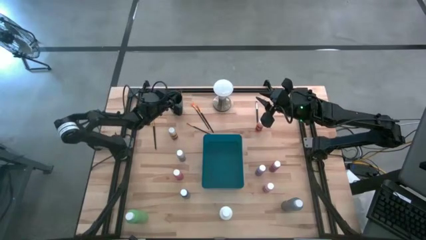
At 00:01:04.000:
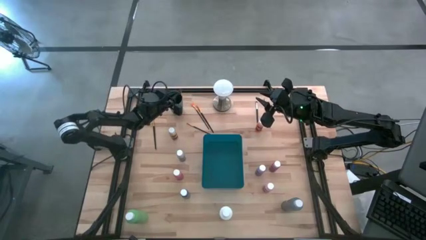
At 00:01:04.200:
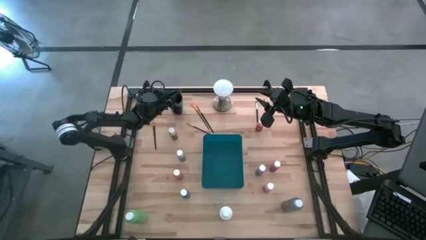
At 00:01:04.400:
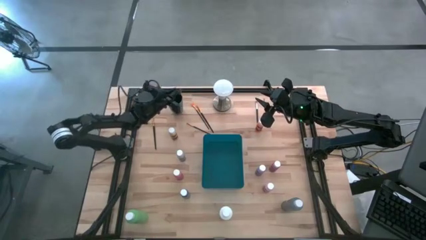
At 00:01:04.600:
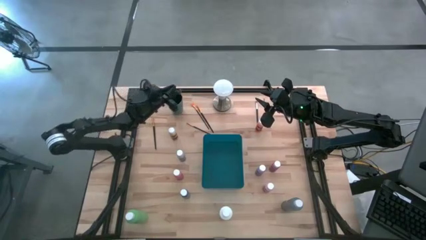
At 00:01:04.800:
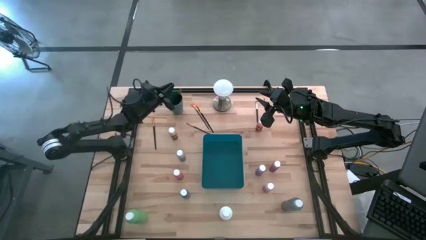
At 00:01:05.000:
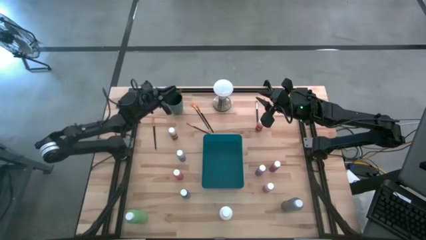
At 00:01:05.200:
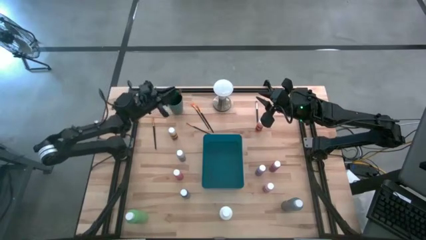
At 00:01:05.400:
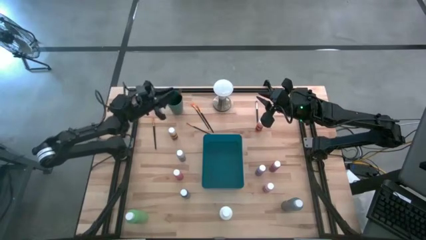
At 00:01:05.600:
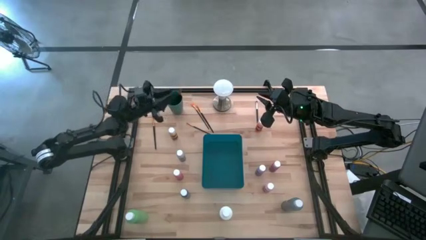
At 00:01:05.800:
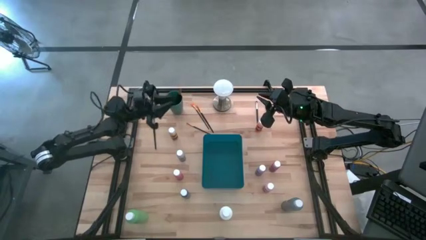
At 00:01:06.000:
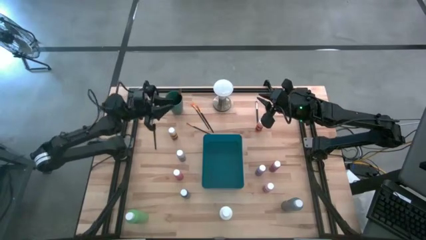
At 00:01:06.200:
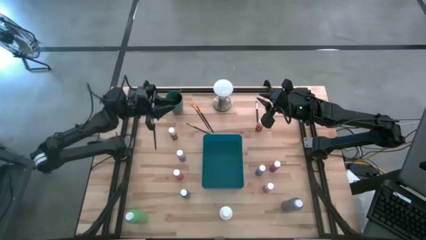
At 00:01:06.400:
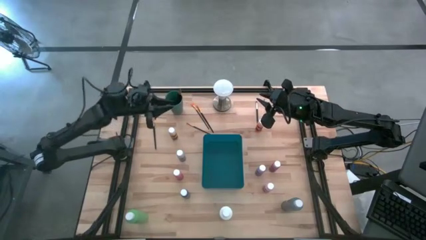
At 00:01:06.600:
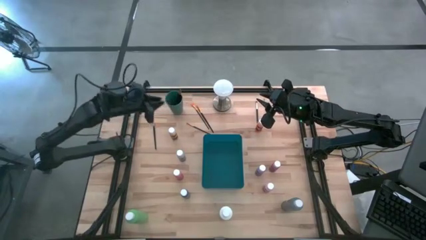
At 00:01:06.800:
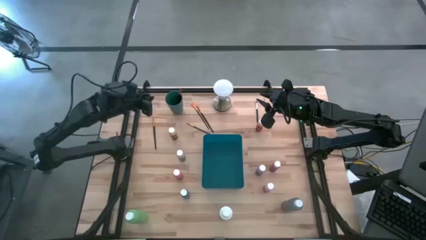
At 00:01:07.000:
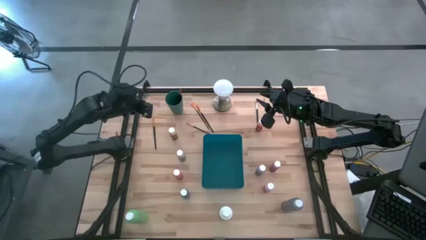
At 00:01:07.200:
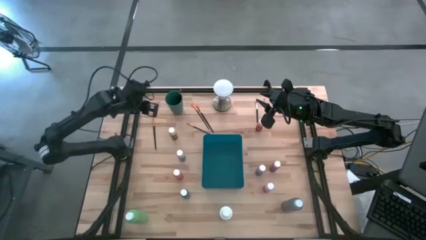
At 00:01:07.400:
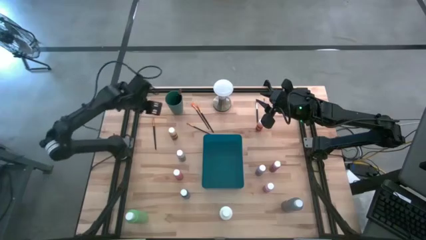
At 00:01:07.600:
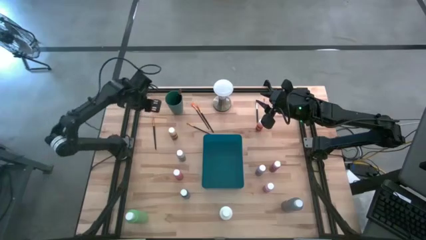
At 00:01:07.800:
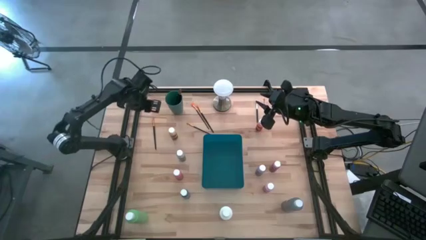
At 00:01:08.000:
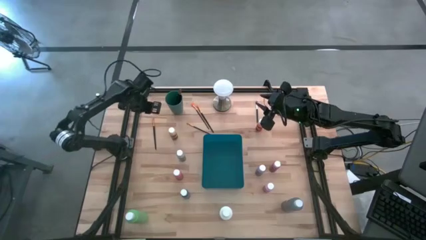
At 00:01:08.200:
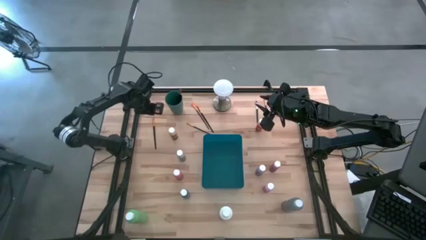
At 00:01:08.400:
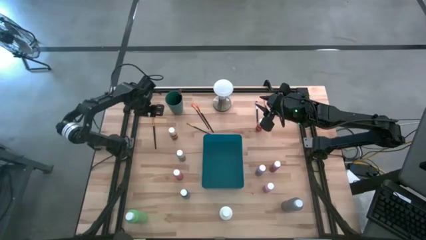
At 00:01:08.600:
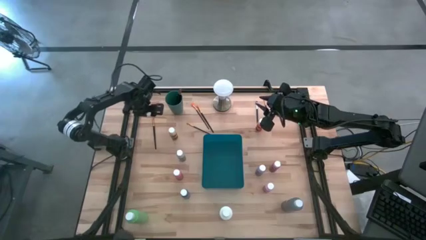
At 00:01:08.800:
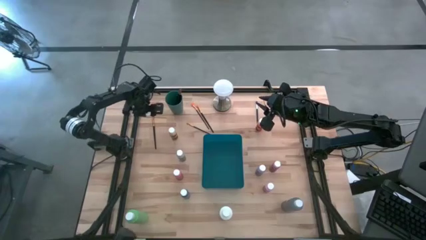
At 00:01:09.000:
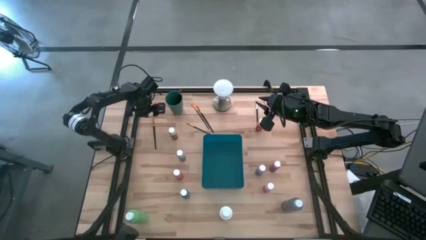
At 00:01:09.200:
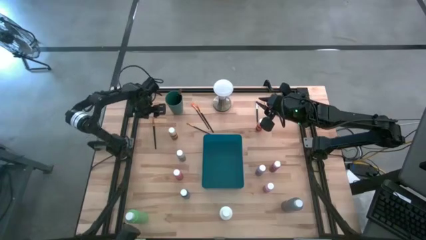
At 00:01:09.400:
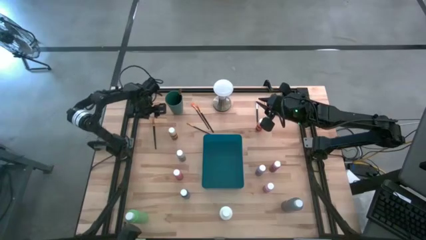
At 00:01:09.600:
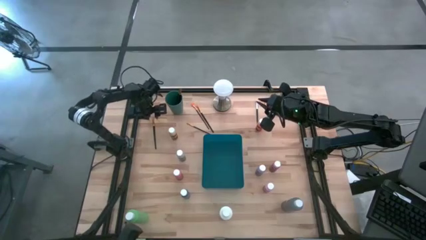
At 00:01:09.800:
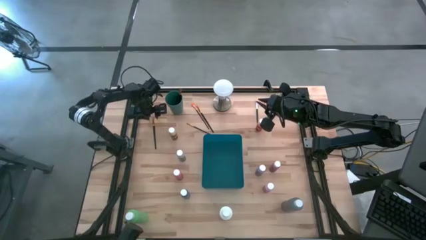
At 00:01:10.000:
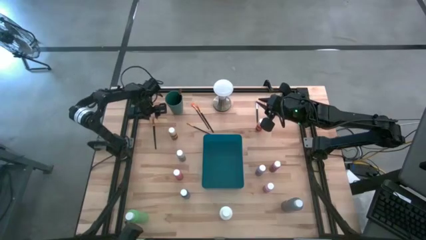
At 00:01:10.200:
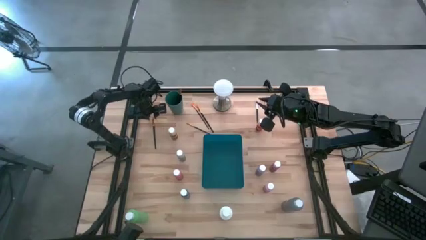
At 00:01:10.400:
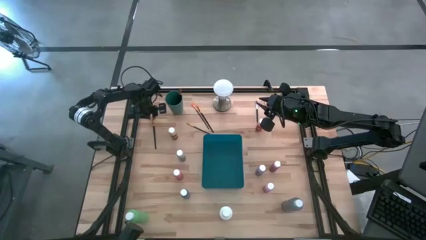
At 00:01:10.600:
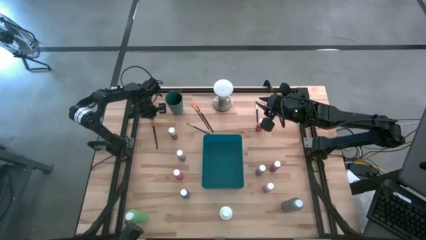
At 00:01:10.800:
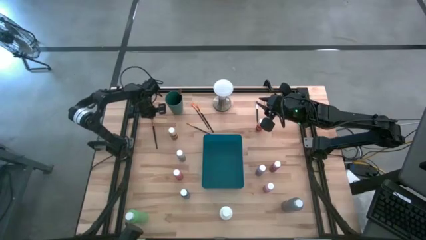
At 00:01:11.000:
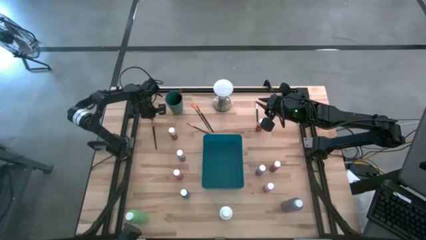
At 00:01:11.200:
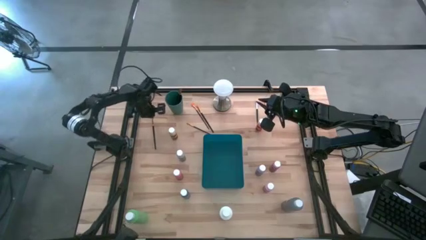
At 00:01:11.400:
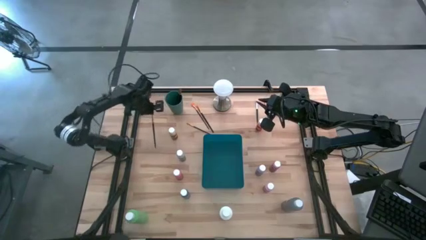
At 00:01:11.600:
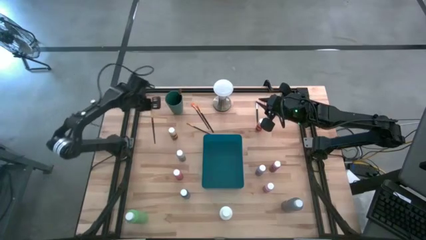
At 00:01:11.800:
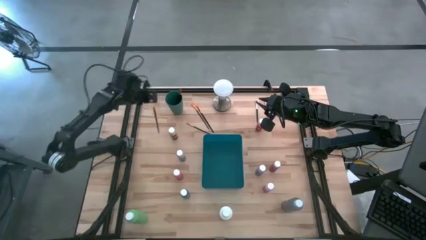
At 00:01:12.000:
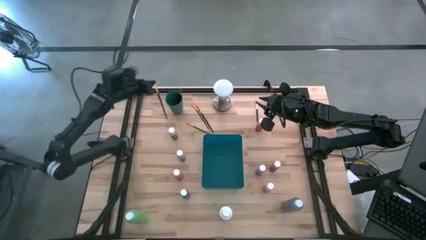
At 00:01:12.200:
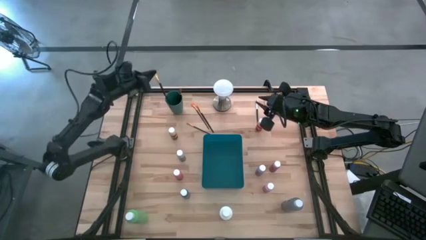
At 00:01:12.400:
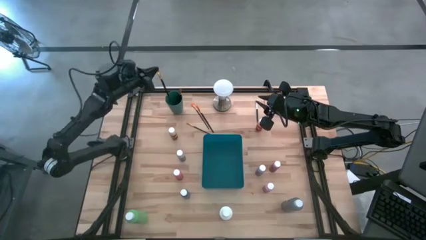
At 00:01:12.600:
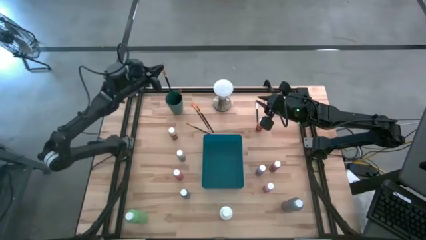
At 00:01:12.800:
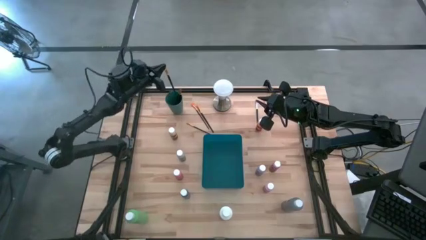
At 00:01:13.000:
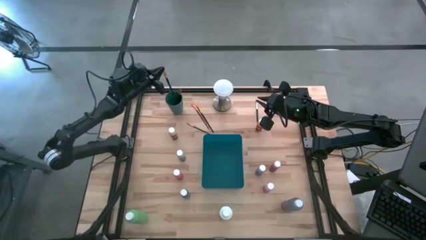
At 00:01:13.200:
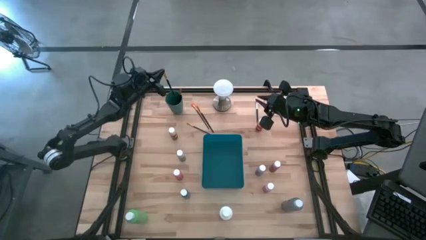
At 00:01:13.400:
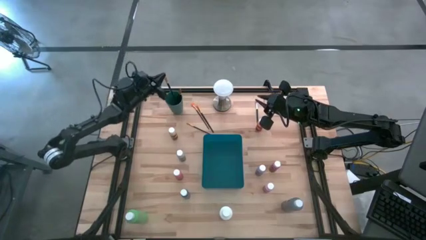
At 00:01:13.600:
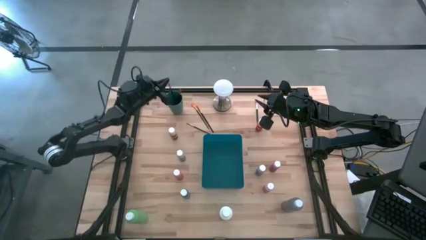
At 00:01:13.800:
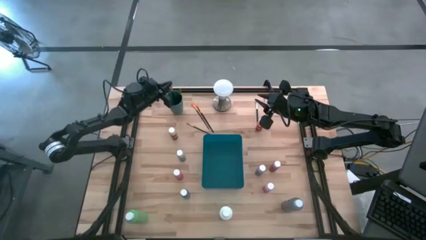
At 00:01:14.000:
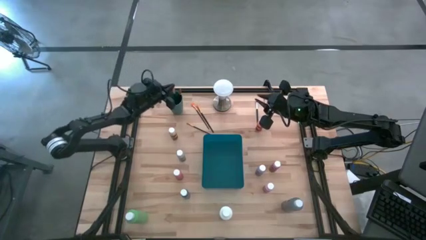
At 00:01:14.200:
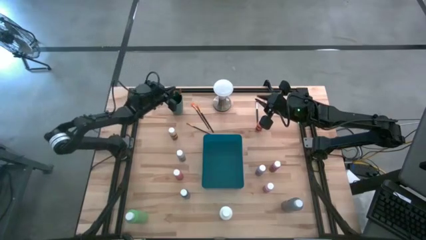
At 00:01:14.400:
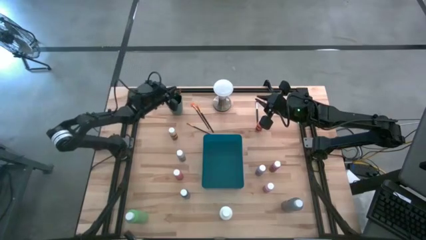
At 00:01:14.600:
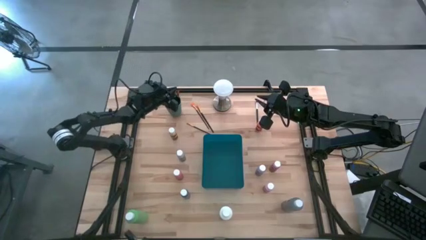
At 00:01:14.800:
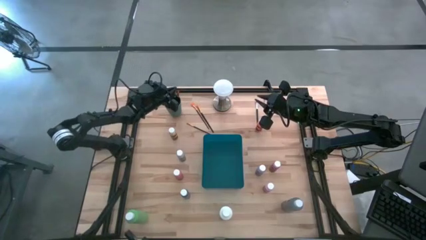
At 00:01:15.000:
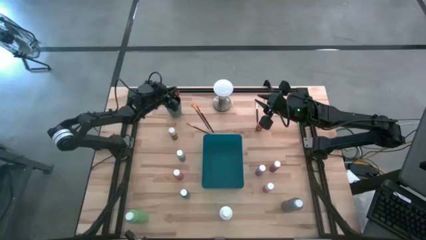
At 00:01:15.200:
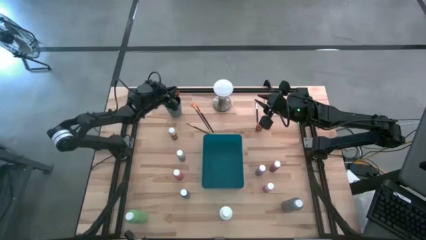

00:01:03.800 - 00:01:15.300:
Task: Pick & Place Paint Supplies
Put the yellow paint brush into the green cup

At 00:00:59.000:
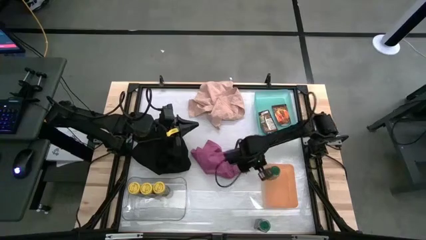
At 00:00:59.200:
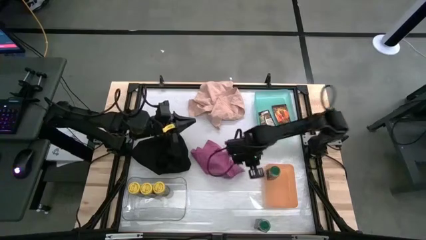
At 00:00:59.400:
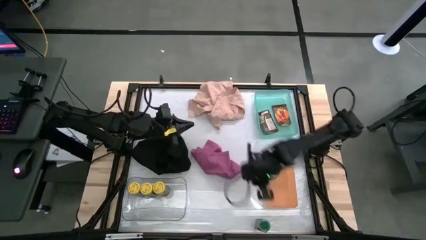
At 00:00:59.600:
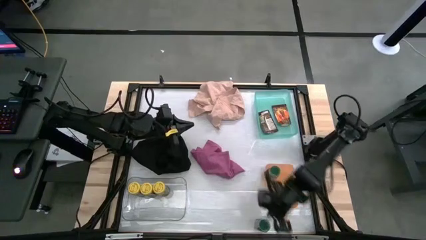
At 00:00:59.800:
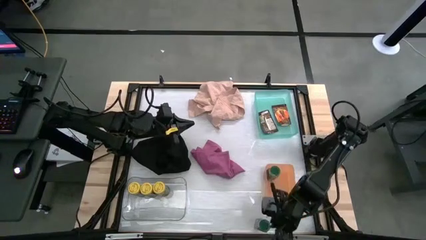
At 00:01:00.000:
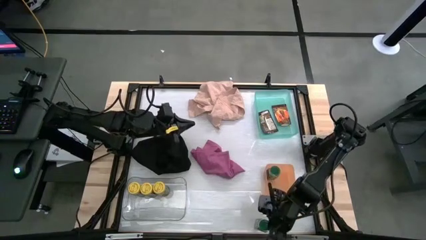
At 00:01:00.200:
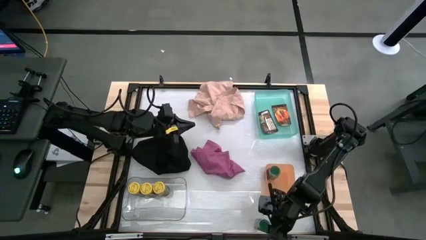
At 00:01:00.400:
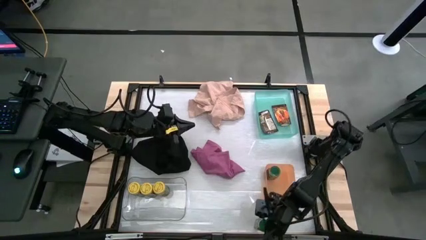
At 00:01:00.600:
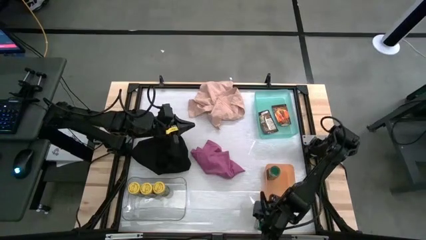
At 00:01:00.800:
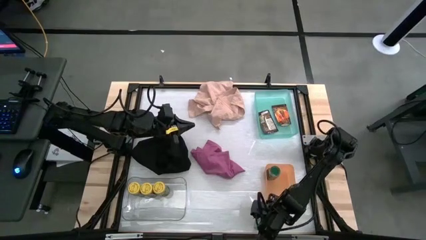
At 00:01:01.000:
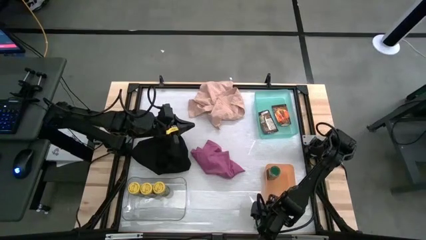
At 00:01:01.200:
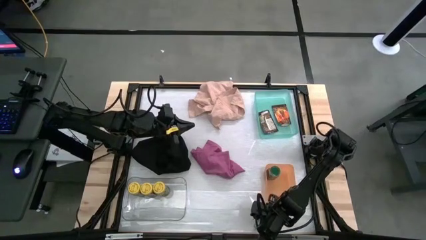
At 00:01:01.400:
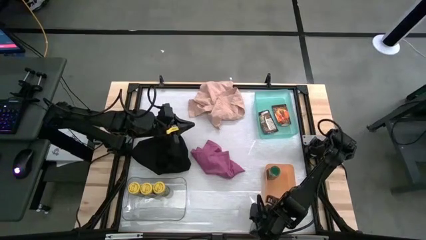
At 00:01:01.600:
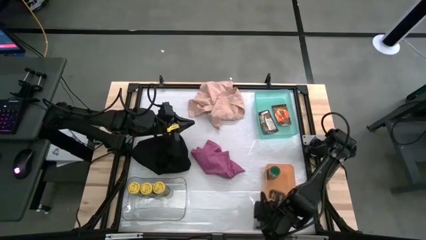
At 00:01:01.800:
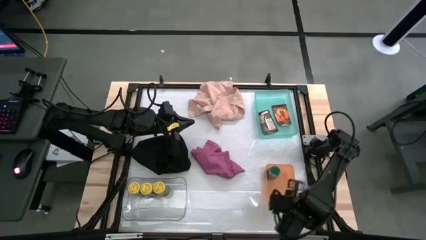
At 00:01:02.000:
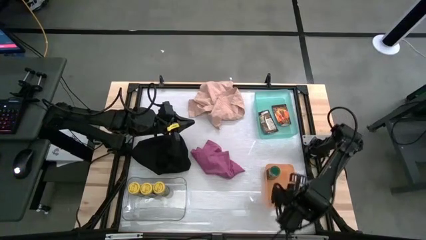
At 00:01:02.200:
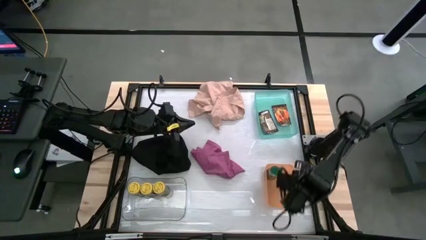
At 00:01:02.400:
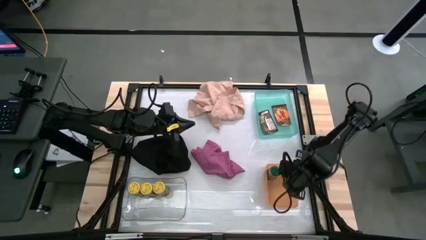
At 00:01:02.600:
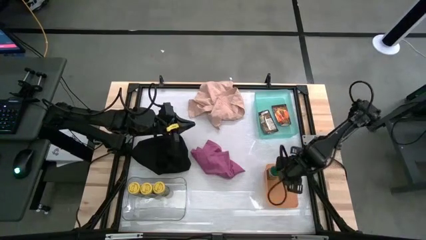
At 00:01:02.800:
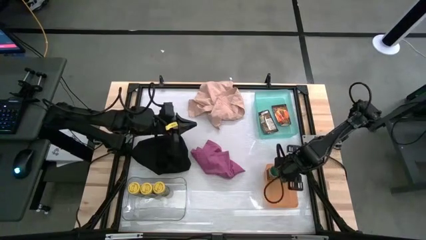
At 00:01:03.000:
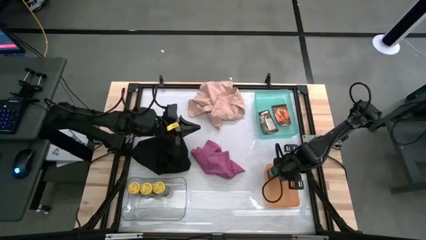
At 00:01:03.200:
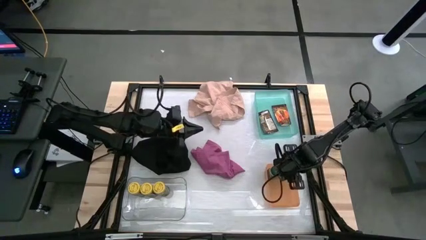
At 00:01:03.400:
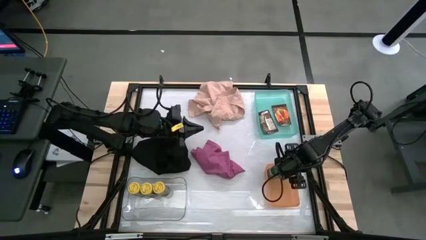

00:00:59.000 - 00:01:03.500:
Task: Sort spices by type
Put the green seasoning bottle into the orange bin
